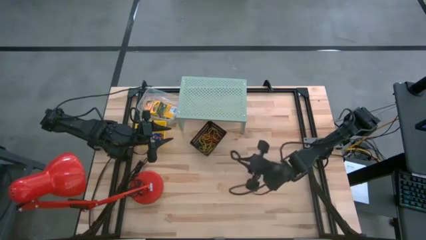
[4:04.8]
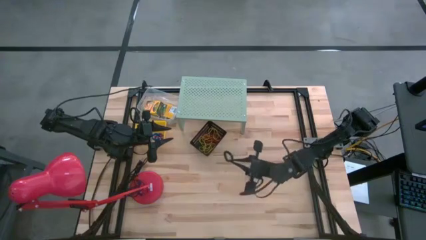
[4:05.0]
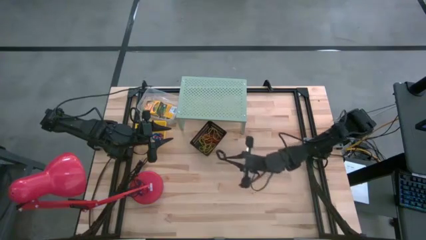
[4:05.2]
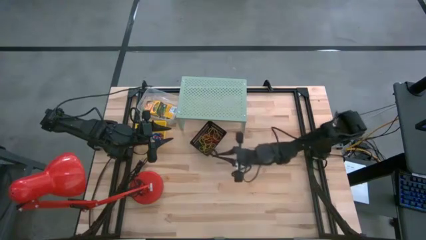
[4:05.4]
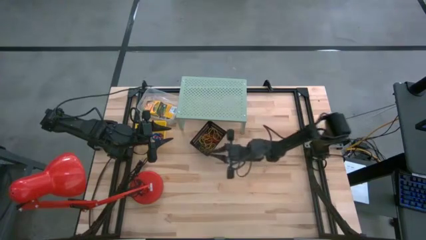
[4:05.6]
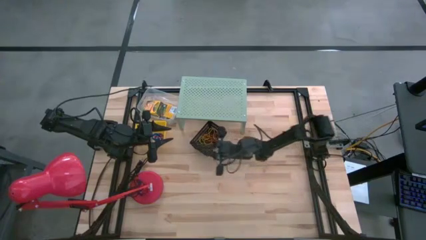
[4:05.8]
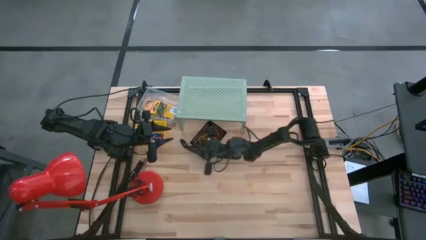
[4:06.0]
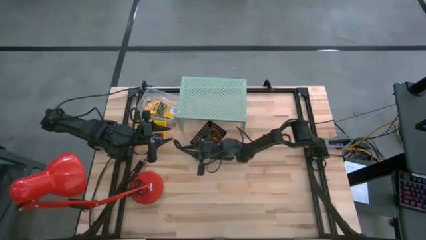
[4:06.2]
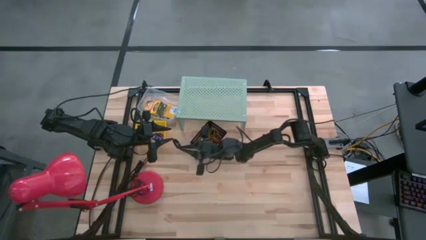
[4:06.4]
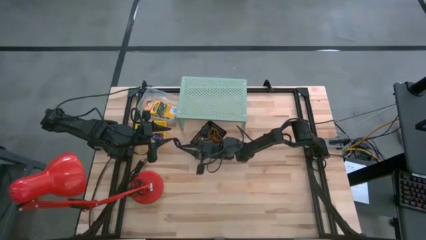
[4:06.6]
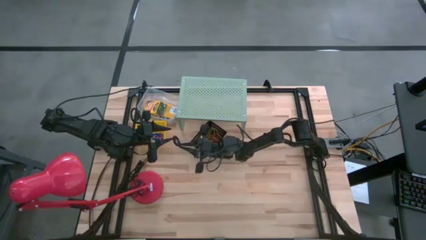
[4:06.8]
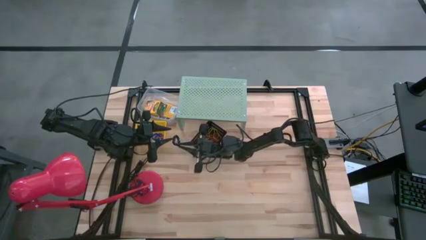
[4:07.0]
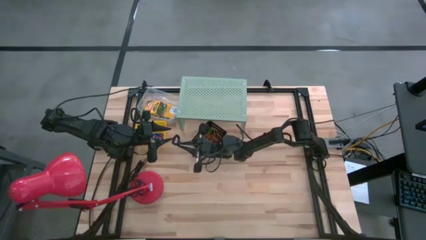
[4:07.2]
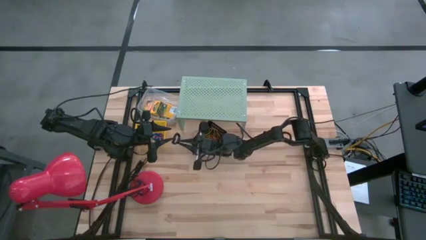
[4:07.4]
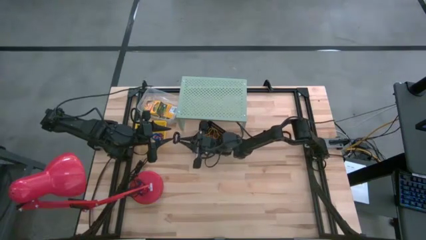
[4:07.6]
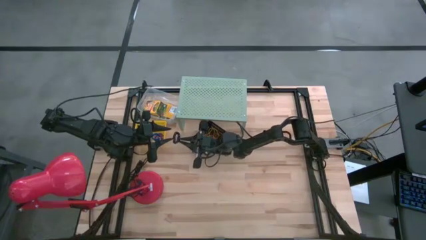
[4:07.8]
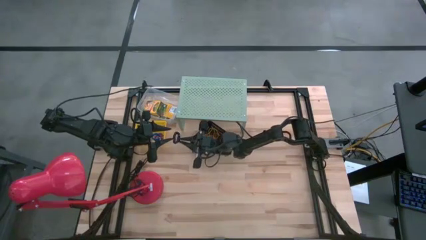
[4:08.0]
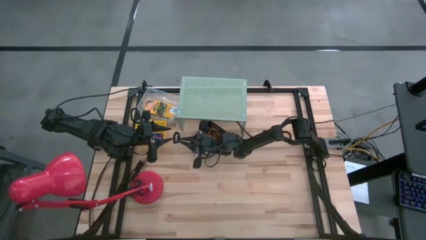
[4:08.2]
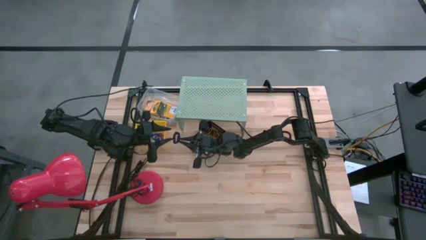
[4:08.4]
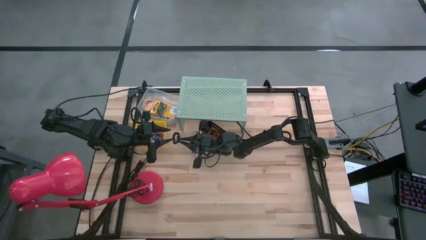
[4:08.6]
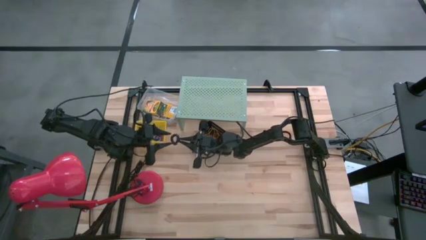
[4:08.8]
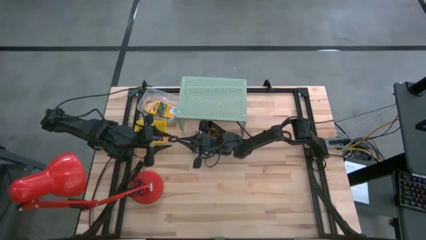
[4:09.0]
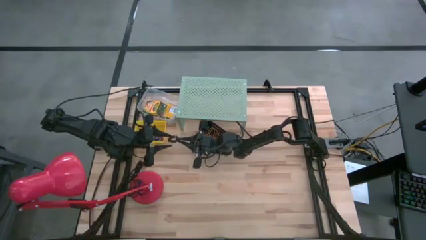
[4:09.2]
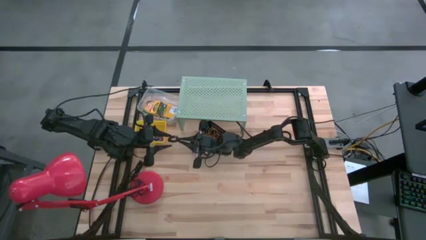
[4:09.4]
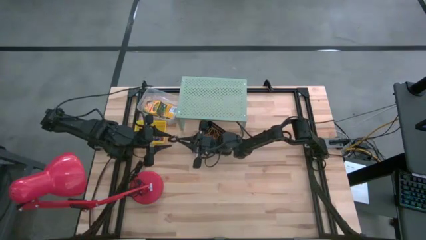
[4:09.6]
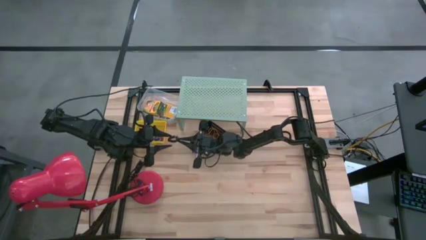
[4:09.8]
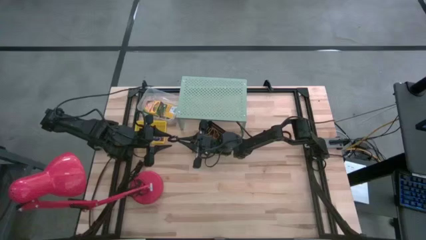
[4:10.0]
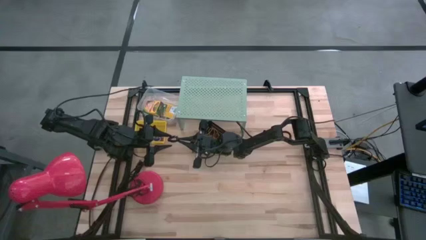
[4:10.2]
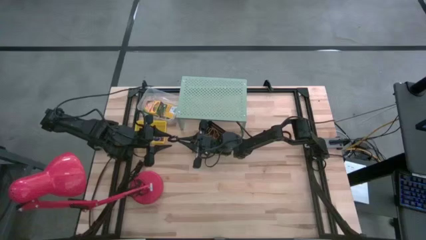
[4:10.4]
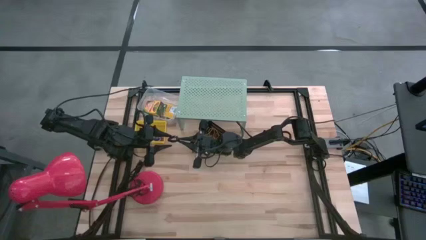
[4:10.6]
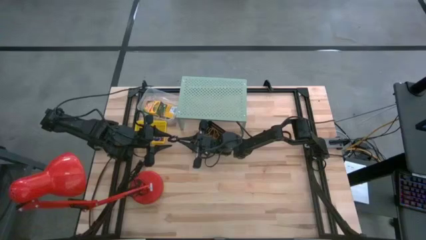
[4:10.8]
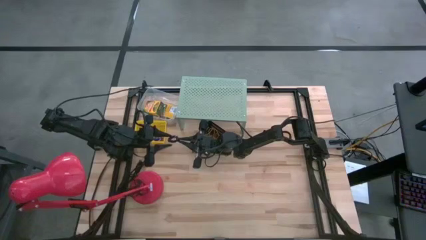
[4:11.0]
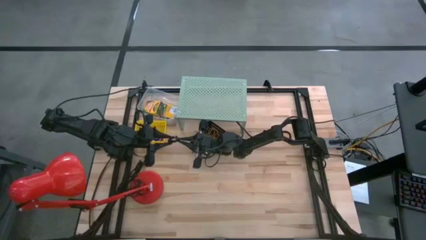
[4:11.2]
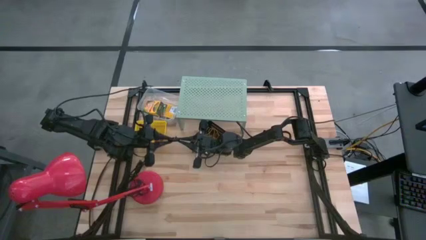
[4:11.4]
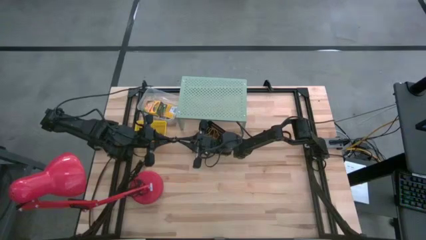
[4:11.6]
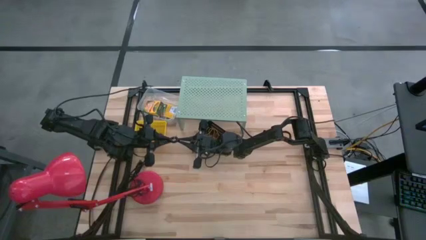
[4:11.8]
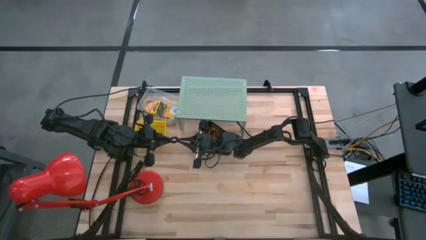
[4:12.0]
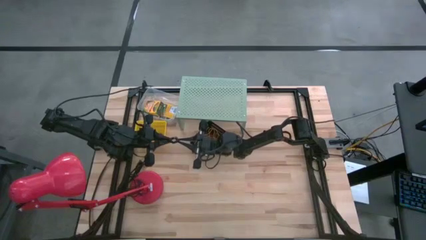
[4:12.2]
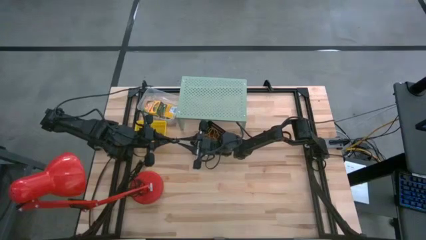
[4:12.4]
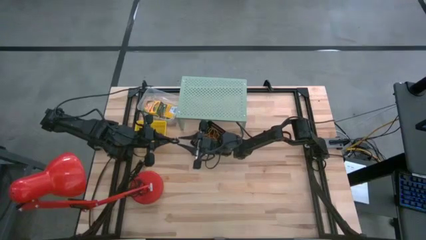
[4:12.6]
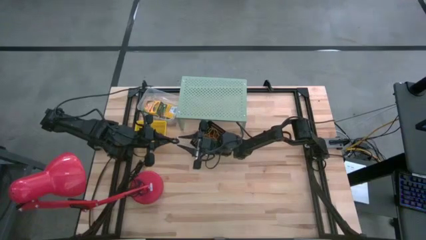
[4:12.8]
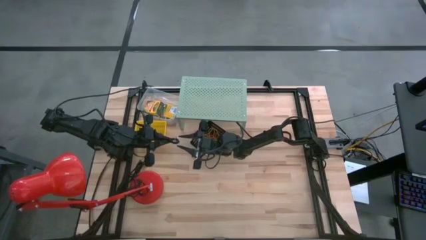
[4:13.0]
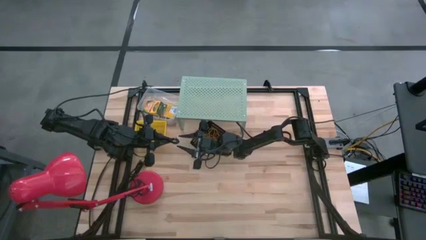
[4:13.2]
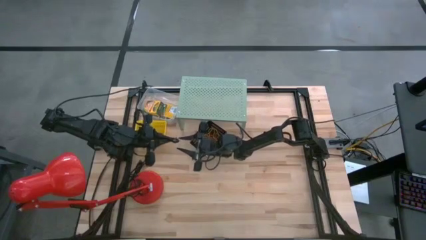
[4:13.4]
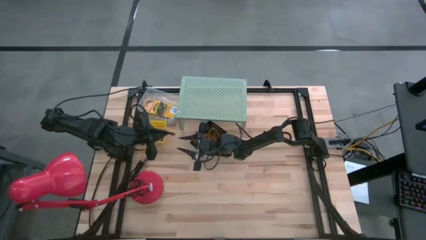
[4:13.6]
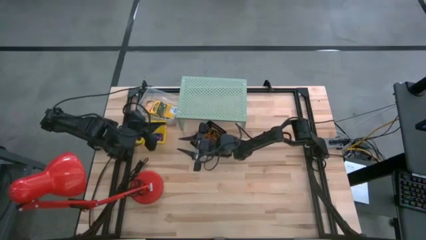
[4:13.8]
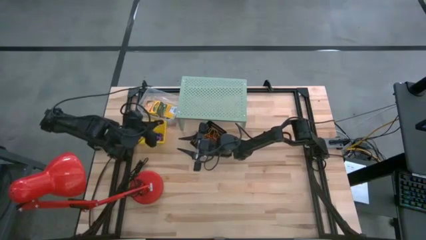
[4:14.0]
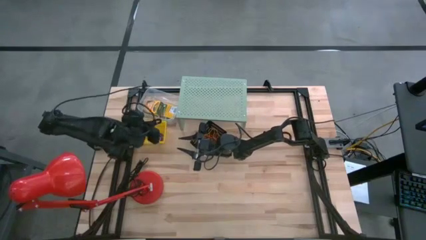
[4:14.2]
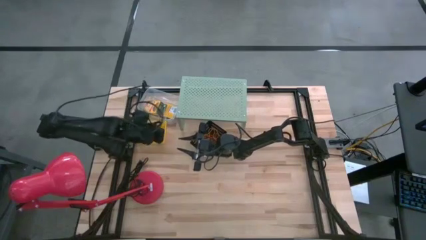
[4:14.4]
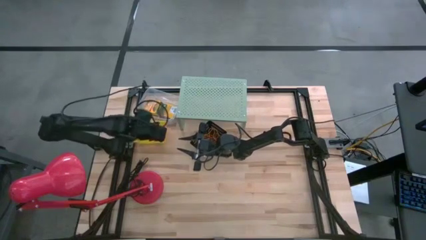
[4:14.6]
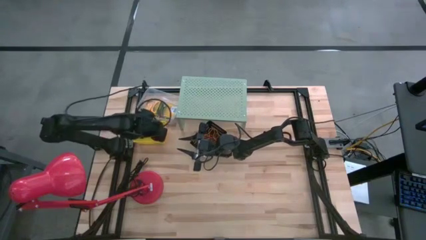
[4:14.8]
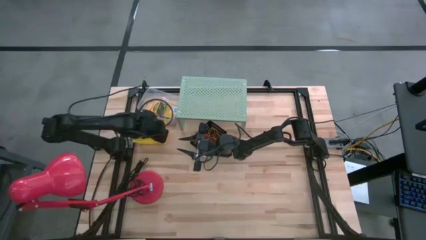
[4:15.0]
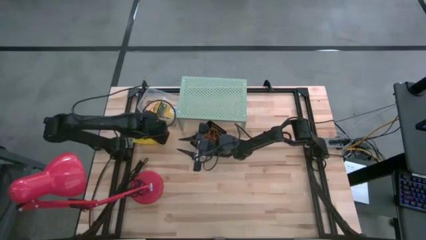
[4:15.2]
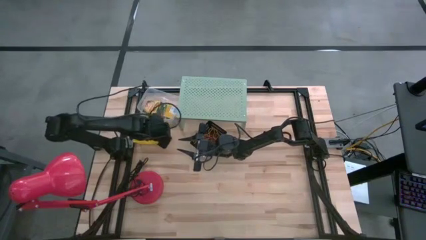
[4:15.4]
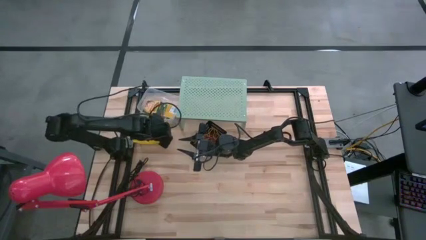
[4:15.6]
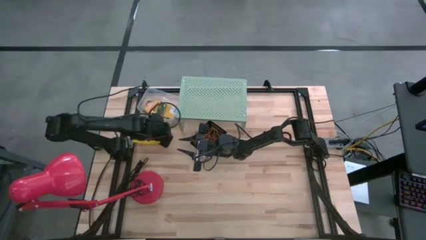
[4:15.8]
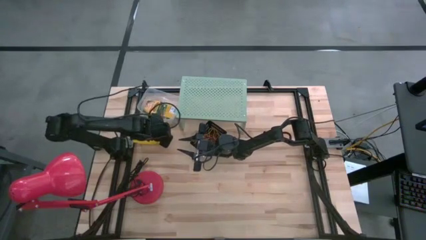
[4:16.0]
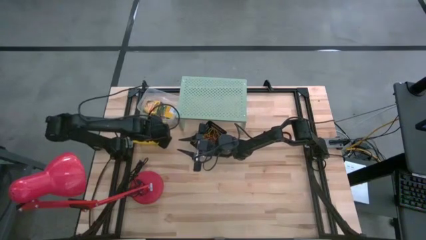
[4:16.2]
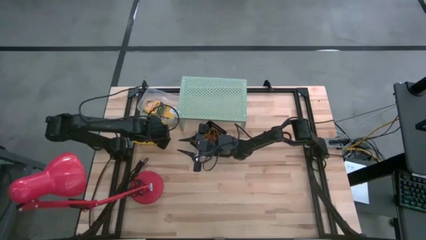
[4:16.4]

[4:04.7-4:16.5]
Task: Pick & Place Office Desk Supplies
Put the black spring rubber band into the yellow bin
